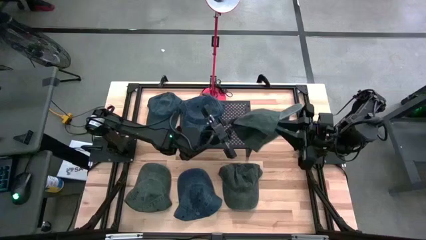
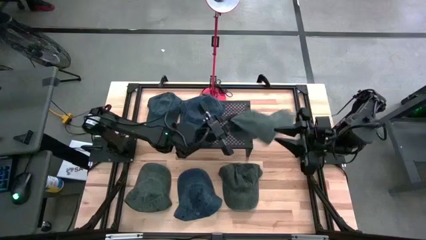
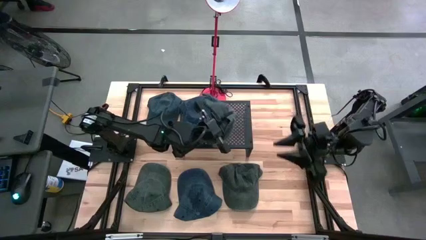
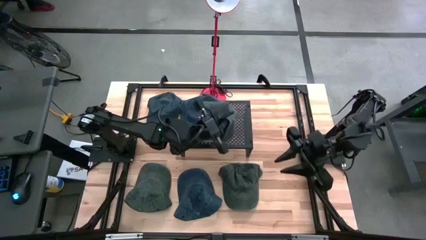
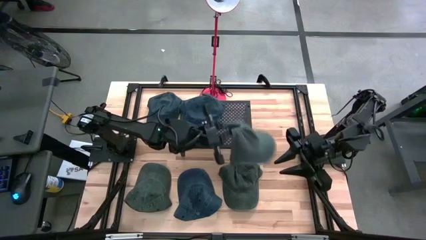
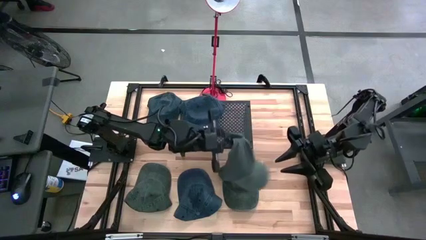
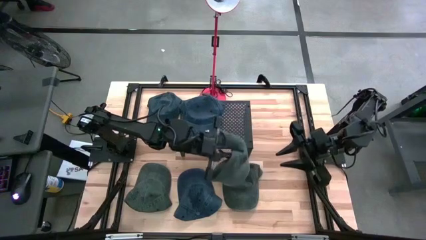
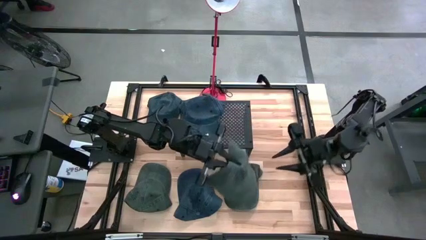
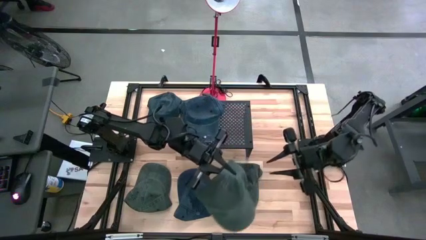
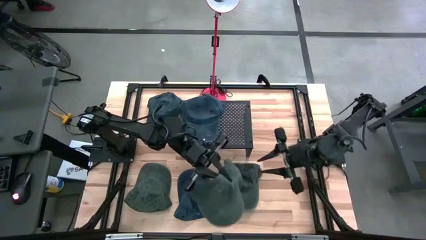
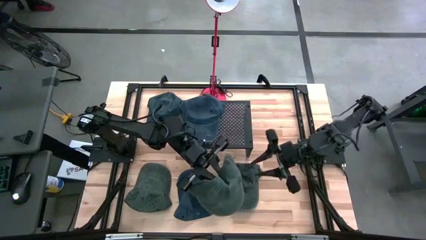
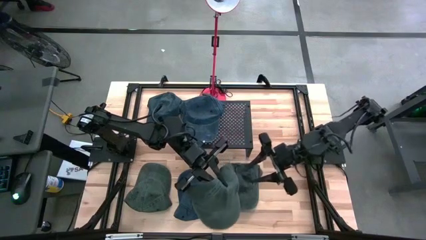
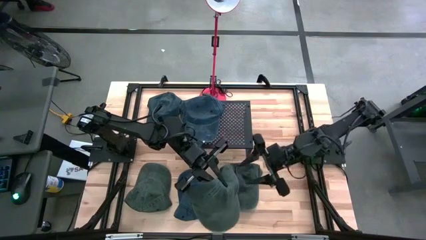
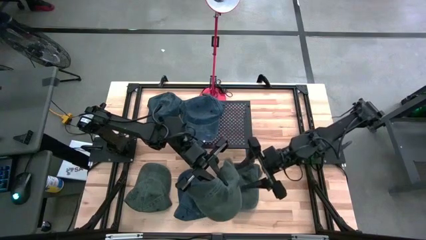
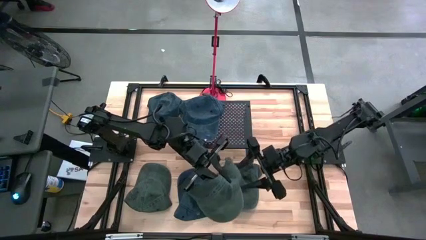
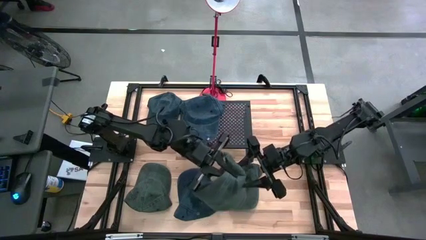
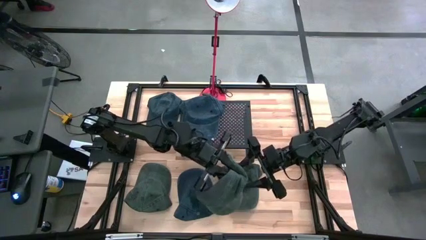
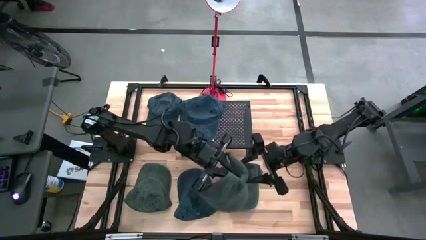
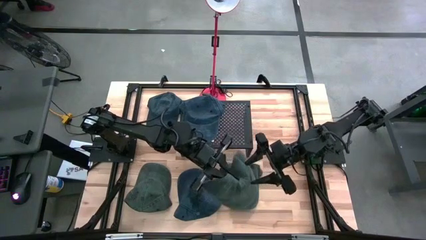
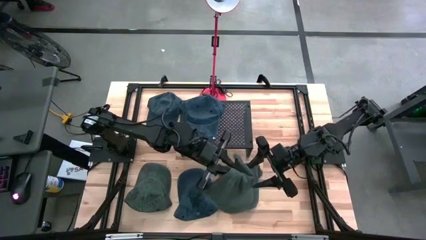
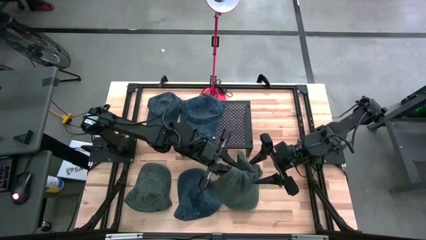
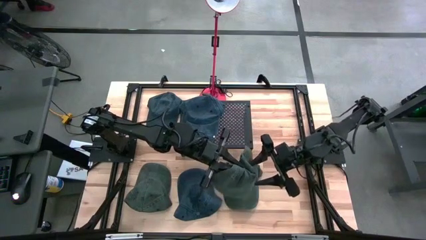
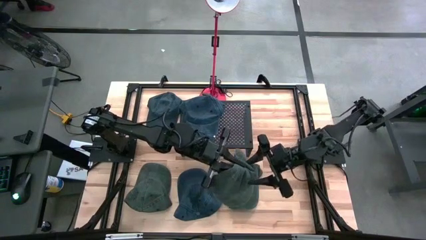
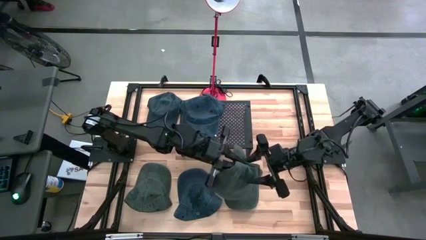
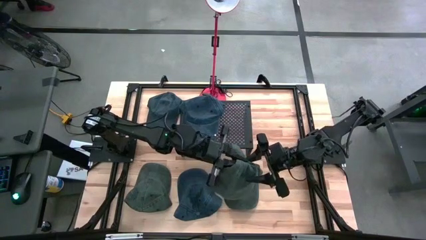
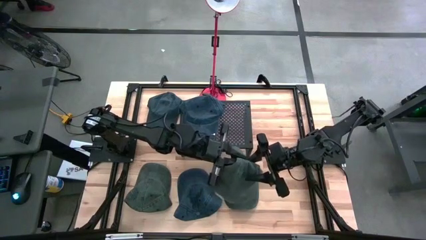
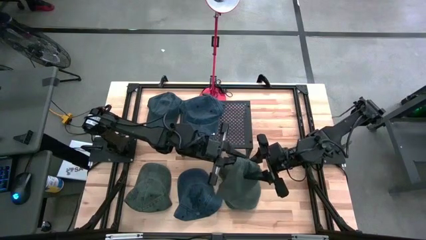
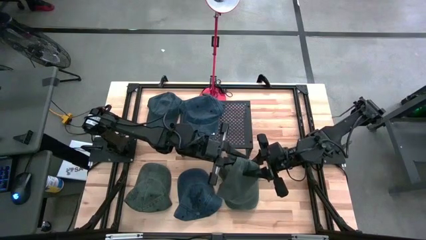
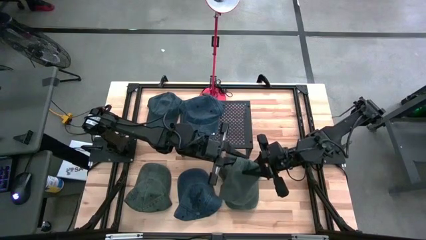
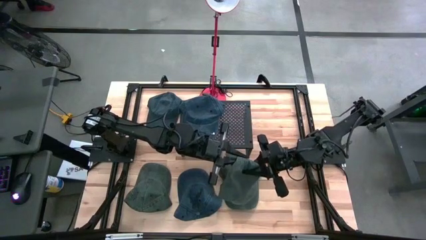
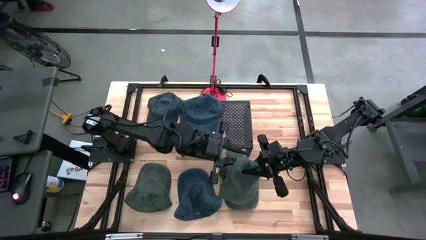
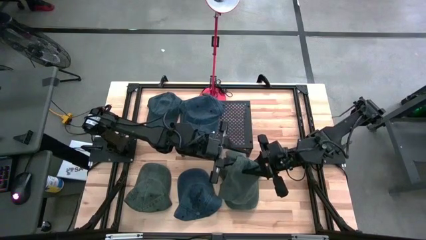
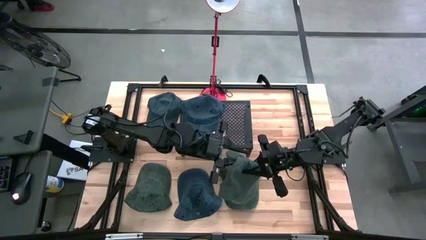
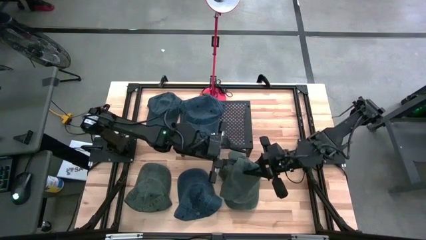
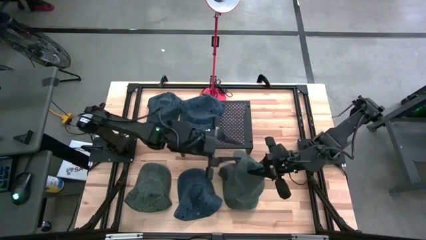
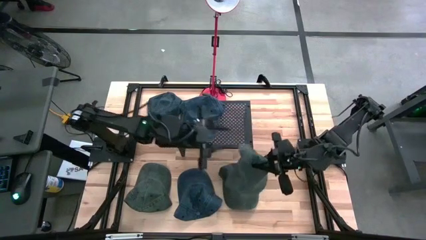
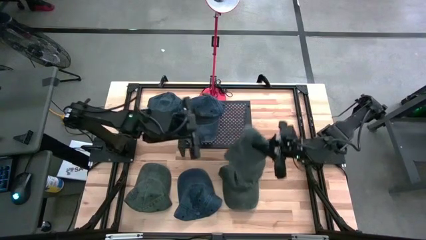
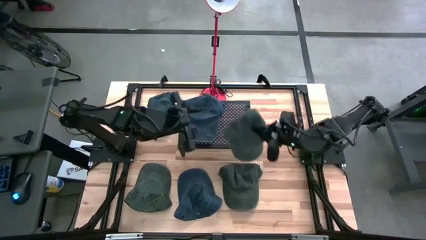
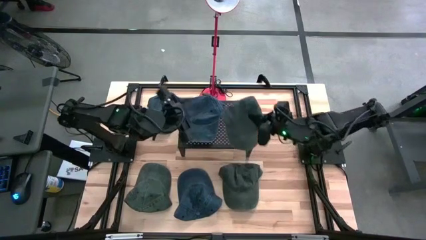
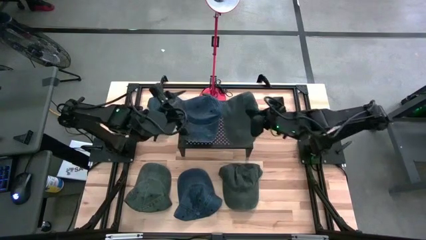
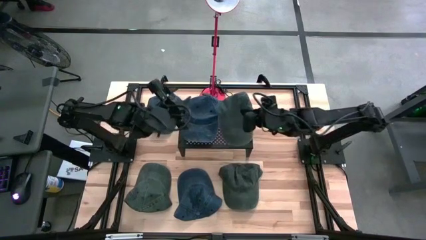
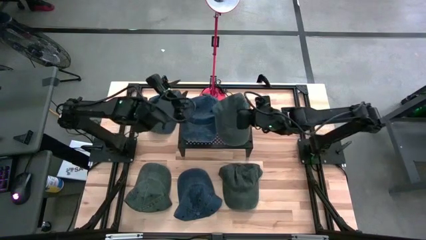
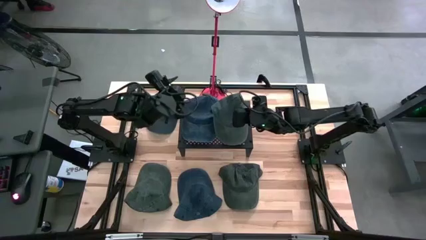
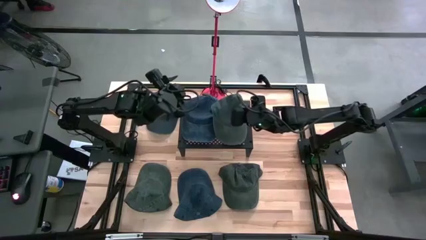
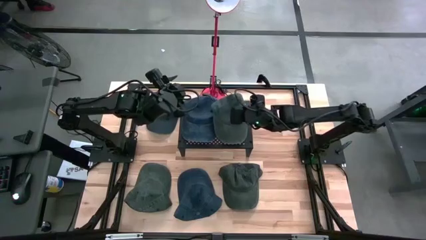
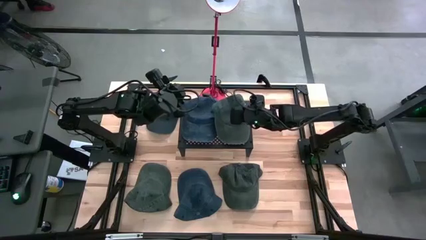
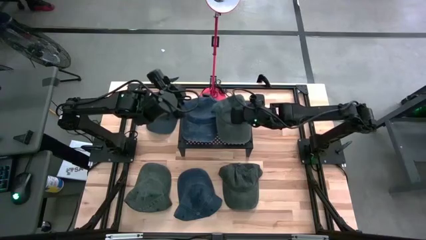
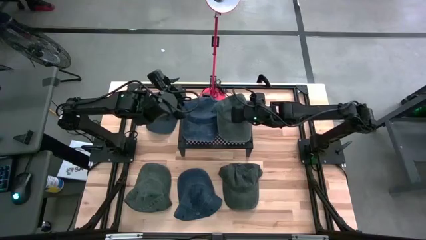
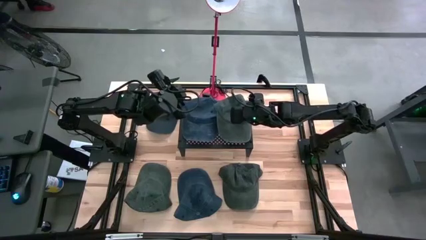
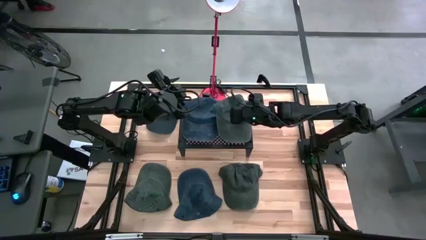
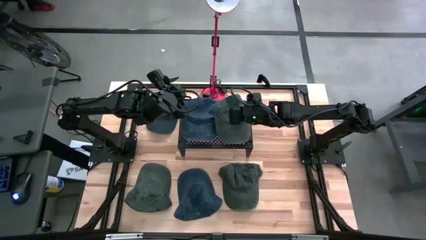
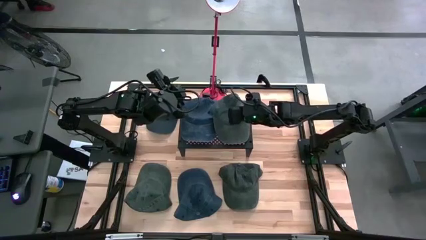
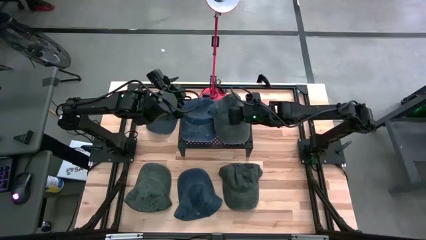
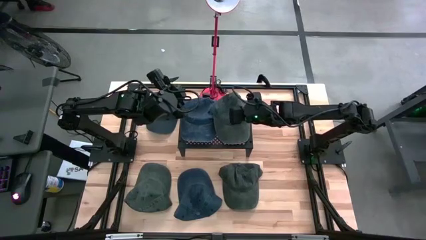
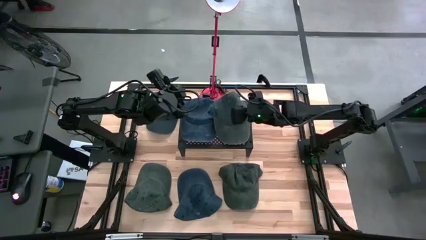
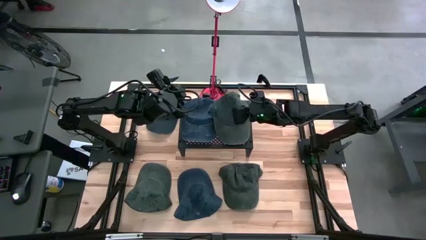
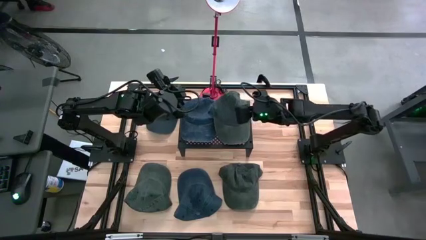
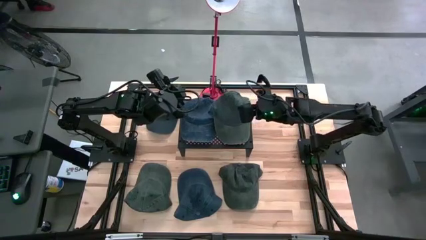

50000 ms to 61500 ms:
Task: Pick & Place hat
Put the bottom right gray cap on the shelf
